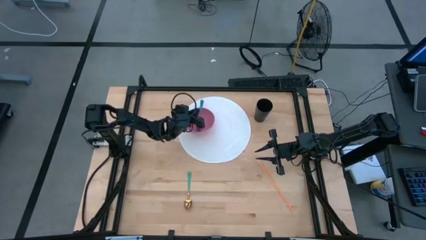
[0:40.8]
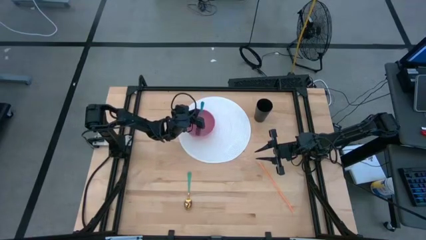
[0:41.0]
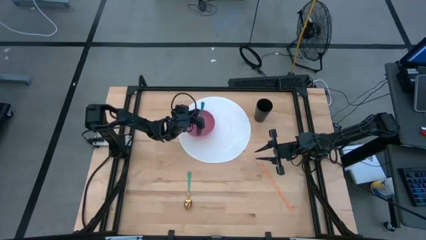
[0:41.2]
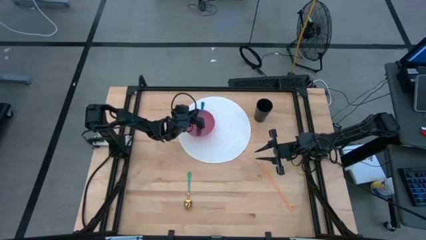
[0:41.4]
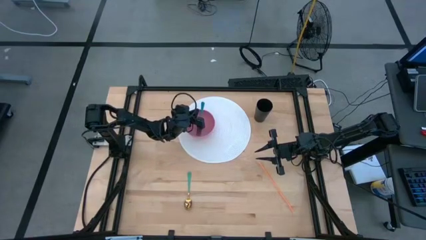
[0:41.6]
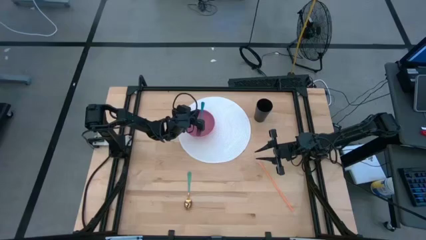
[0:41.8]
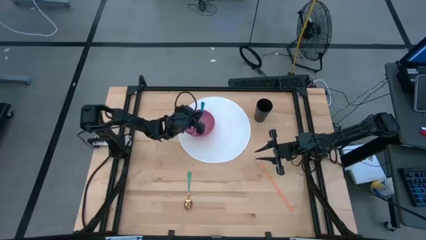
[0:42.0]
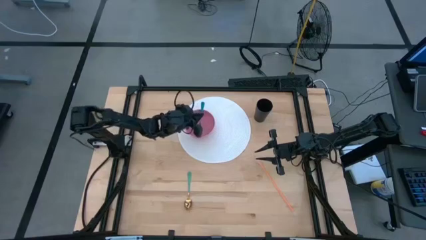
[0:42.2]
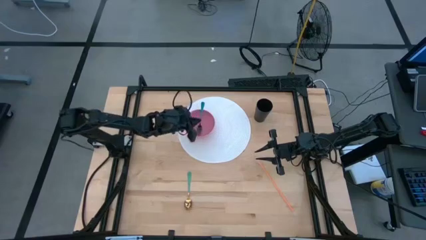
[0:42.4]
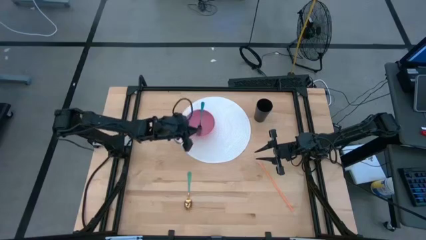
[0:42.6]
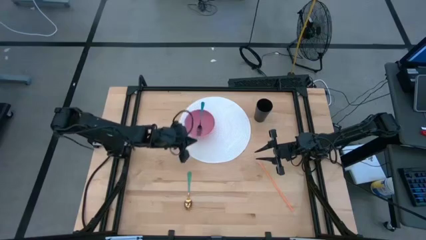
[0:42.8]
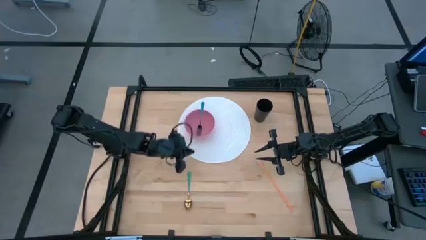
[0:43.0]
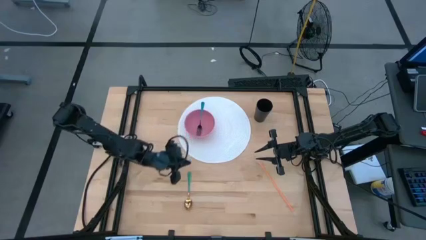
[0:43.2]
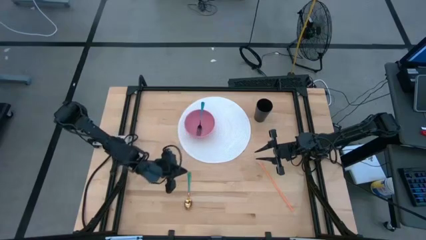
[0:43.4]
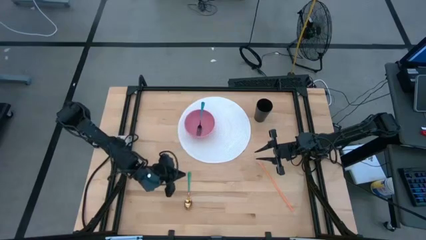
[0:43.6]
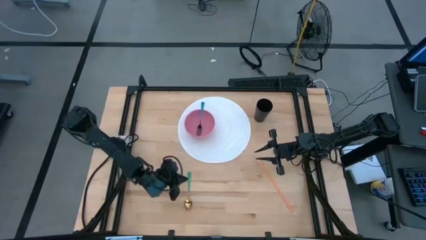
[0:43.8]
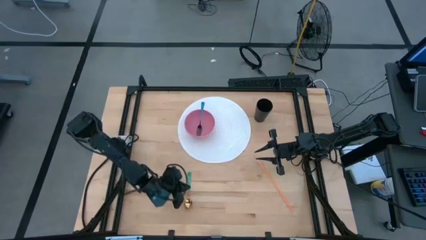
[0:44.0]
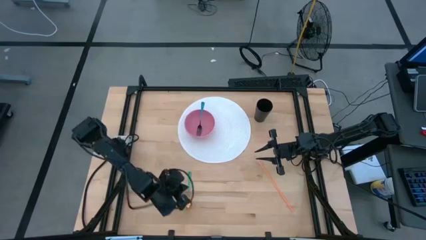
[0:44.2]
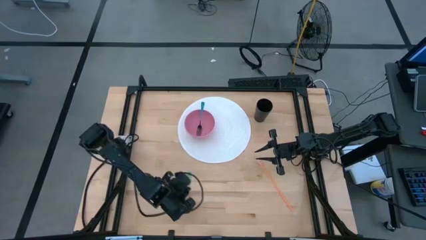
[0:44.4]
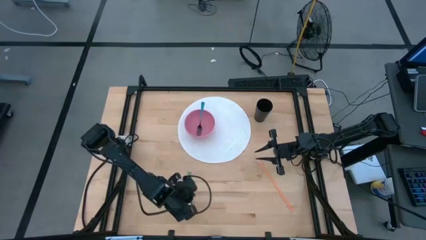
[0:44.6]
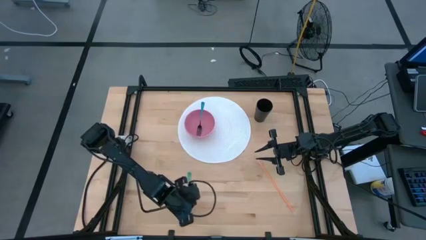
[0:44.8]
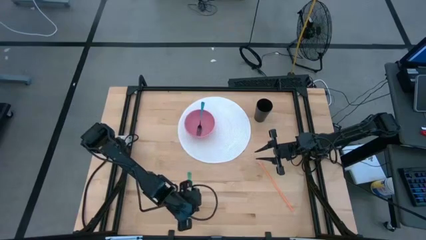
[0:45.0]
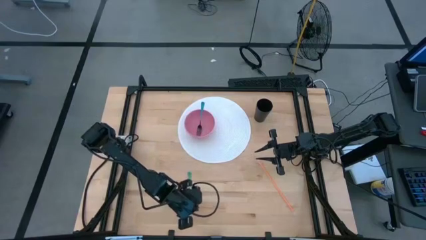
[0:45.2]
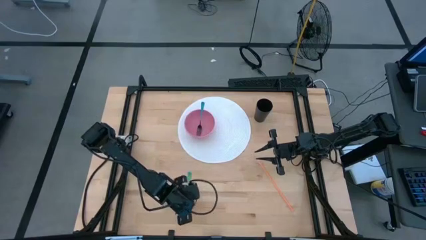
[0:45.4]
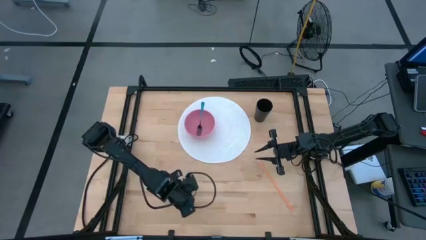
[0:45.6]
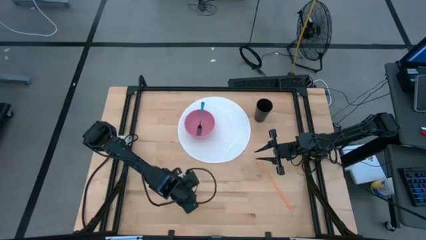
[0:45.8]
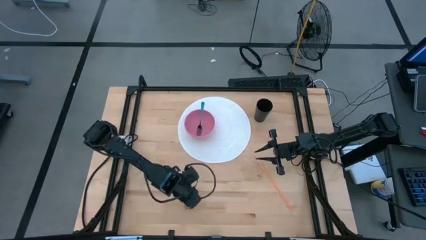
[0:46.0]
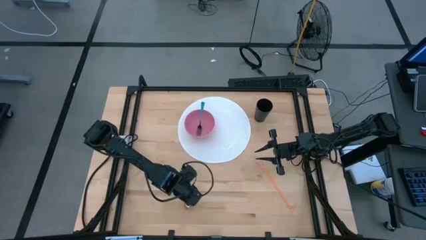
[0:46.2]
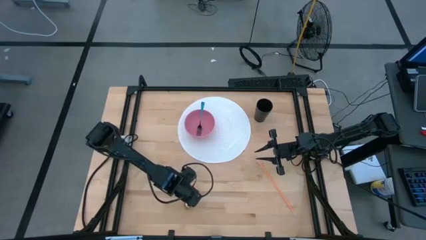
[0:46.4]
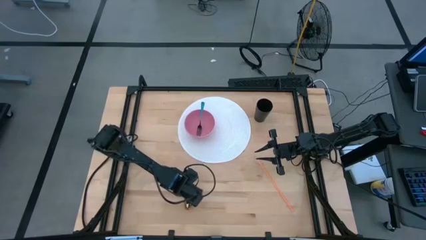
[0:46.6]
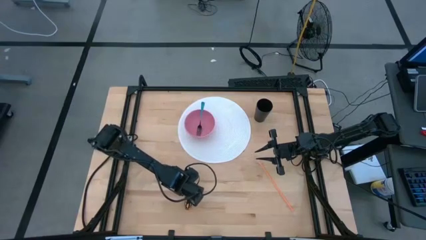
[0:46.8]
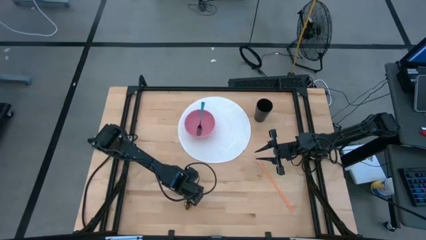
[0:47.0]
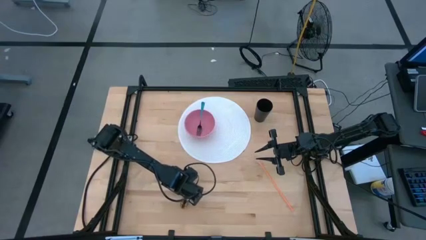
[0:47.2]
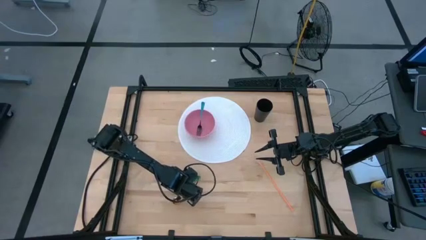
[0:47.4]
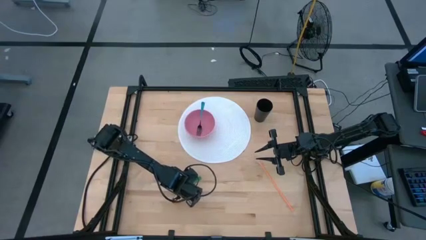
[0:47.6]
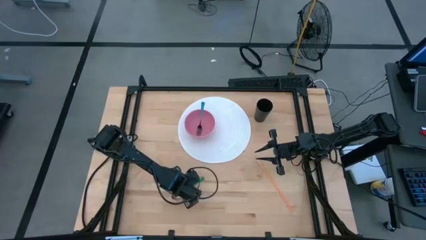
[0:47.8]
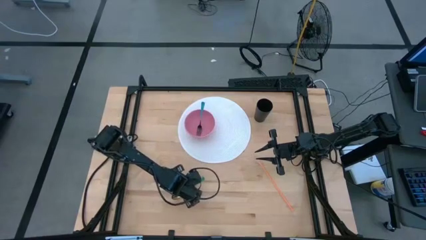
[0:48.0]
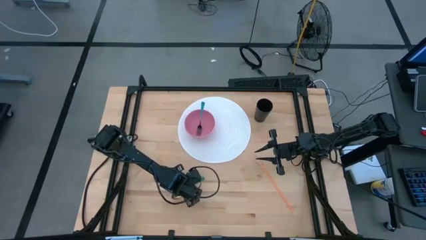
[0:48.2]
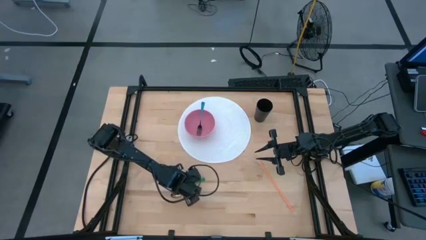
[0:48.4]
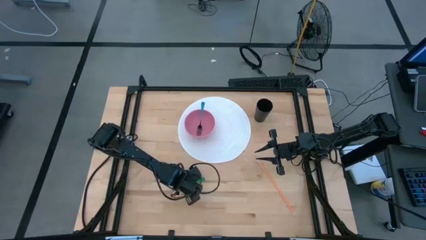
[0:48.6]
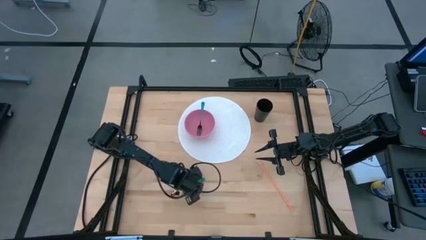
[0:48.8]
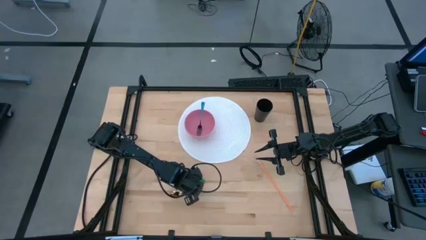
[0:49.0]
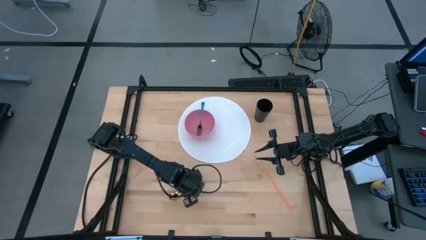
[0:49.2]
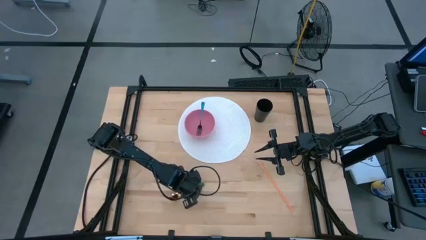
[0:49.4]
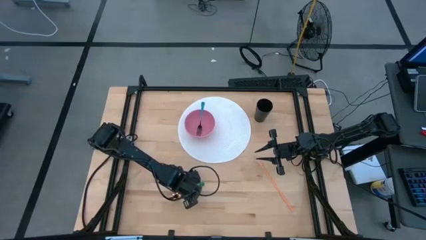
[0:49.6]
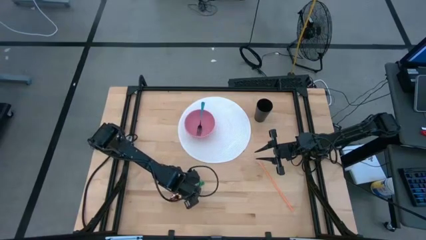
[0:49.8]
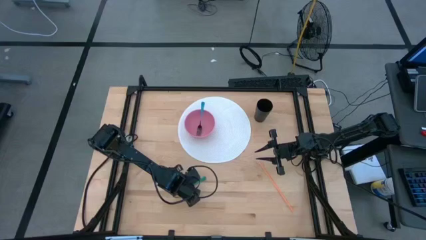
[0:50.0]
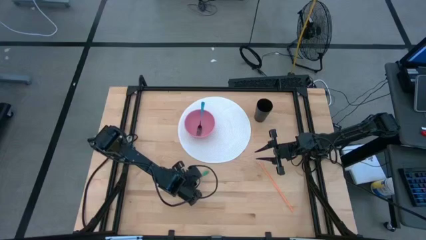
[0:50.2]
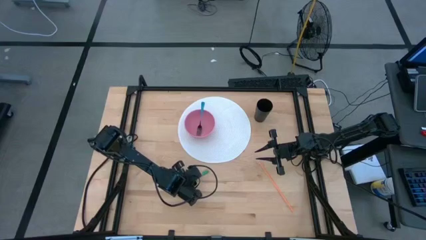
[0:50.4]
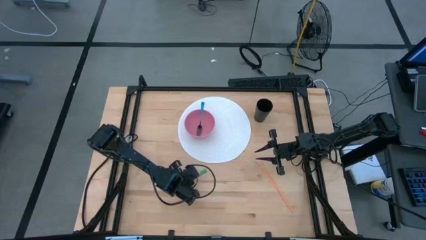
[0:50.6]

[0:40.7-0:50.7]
Task: Pick & Place Utensil
Put the green spoon into the pink bowl

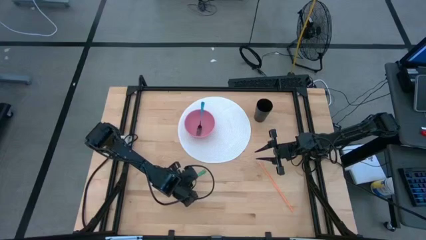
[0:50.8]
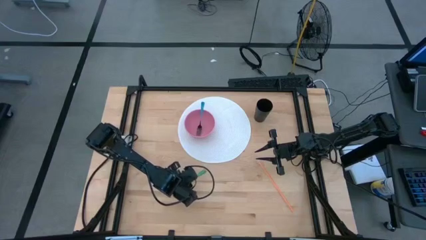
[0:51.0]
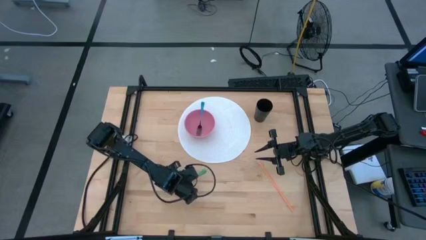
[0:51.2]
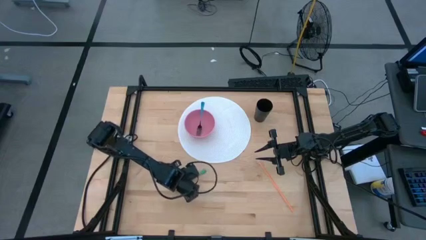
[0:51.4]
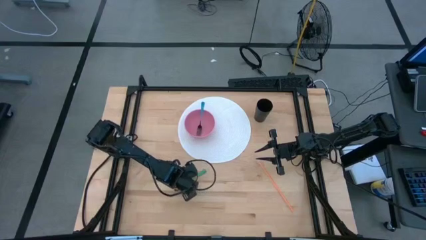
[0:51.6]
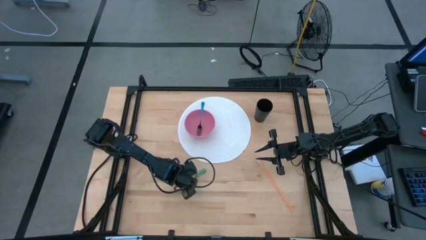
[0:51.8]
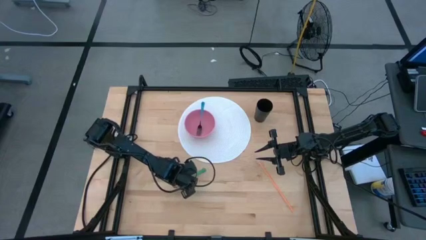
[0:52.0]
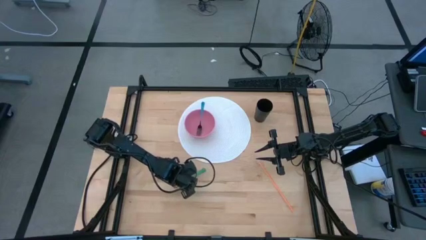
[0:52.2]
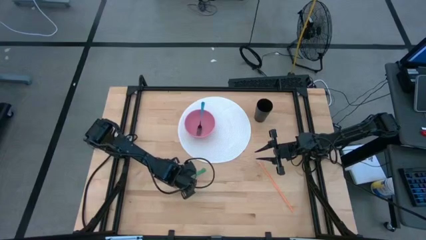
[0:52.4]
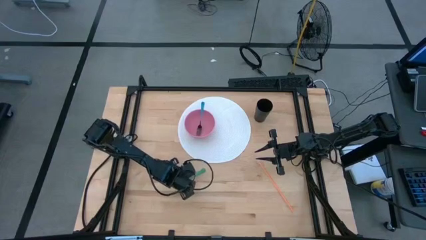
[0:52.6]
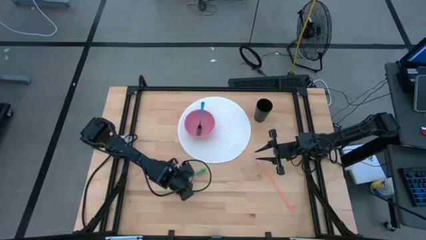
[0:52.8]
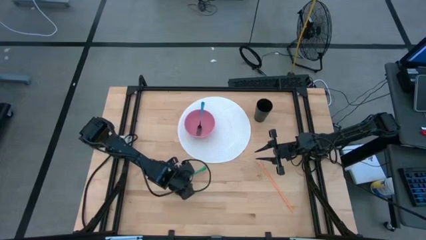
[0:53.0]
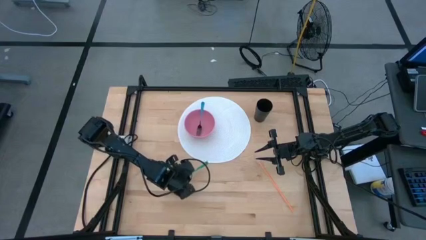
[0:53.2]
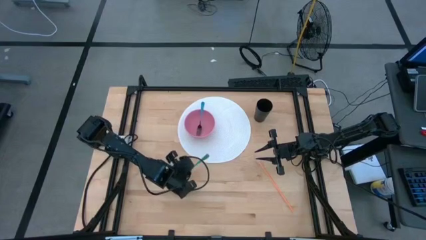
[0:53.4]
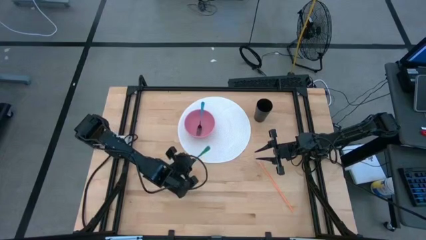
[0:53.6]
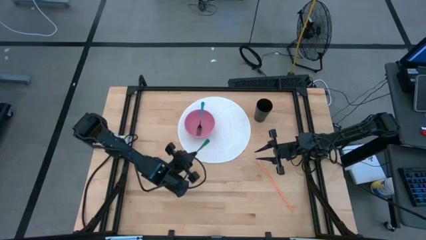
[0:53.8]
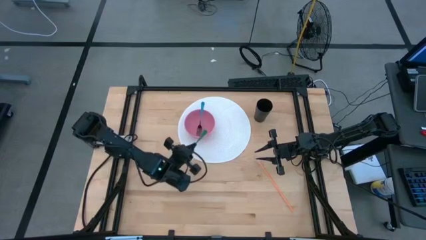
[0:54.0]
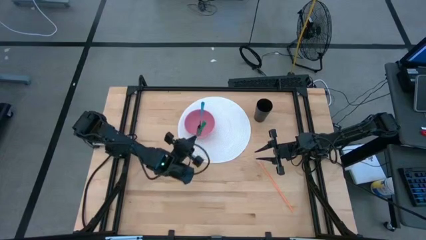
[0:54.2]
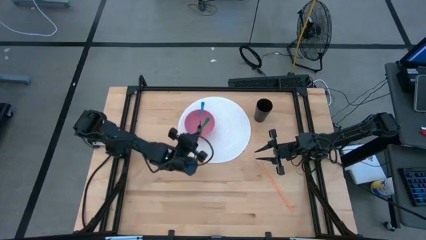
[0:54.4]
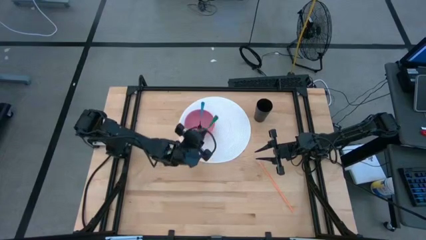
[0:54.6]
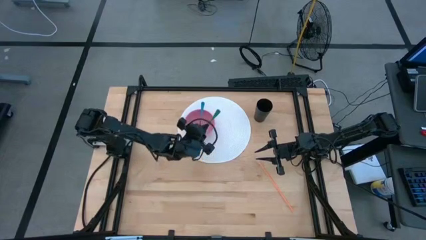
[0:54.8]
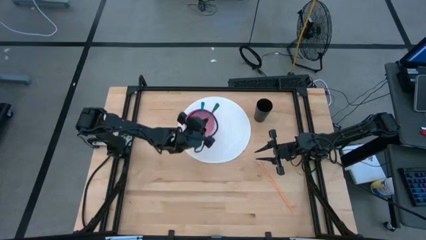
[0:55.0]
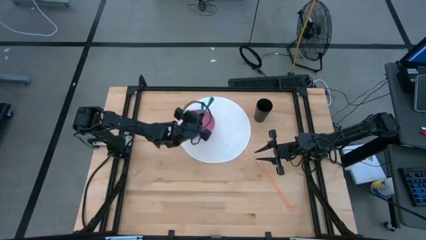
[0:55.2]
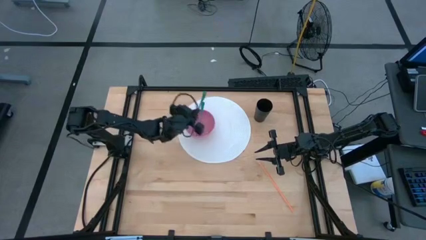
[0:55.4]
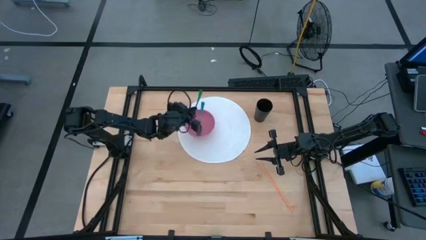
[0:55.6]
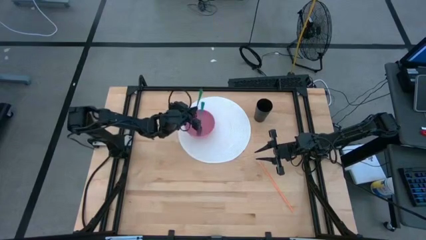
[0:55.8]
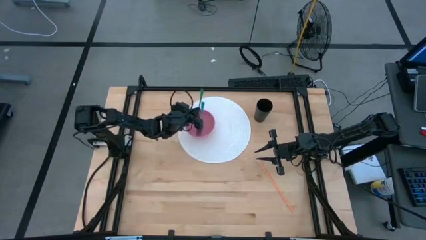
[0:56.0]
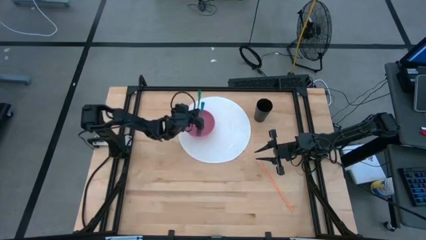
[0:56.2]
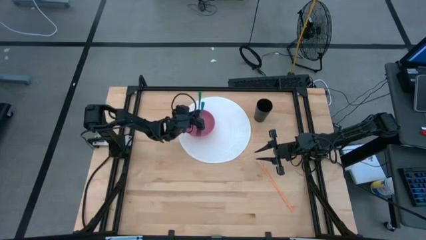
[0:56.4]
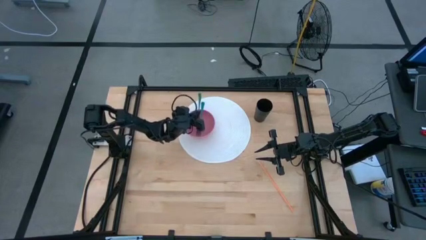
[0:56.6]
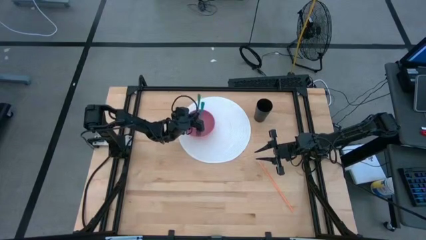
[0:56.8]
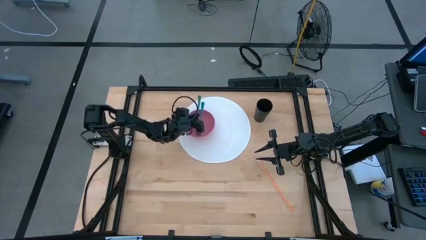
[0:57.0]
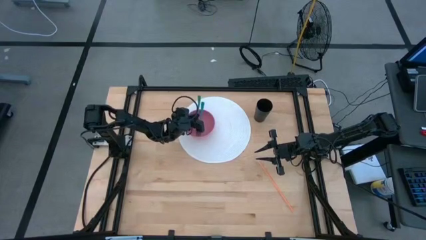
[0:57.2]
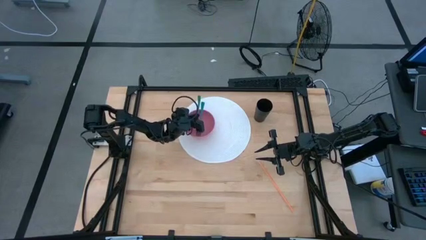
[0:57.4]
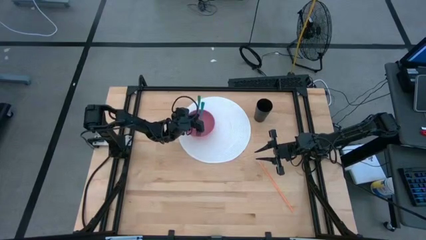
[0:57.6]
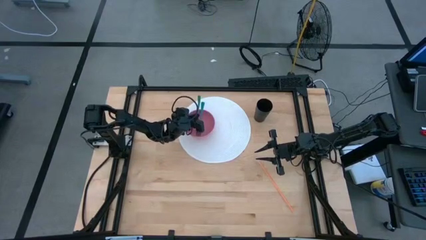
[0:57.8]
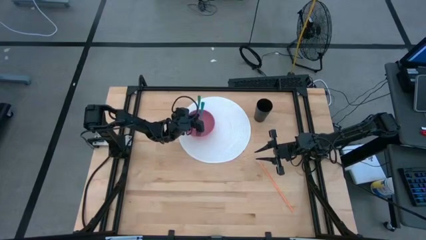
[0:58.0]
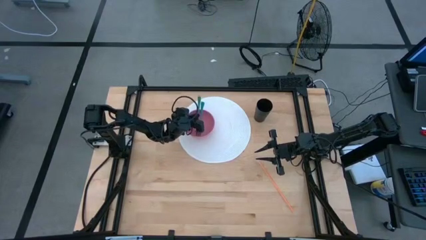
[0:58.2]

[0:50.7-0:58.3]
Put the green spoon into the pink bowl
